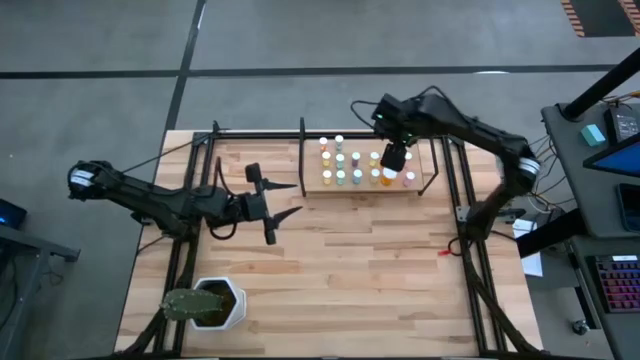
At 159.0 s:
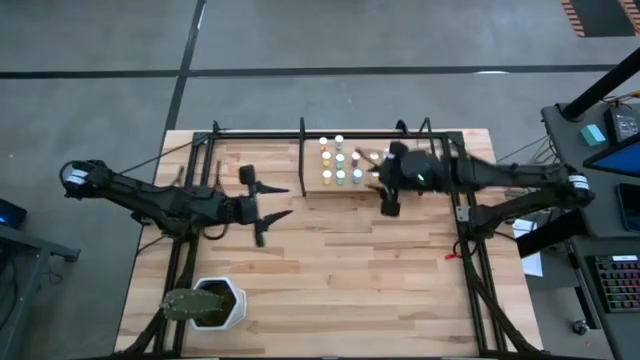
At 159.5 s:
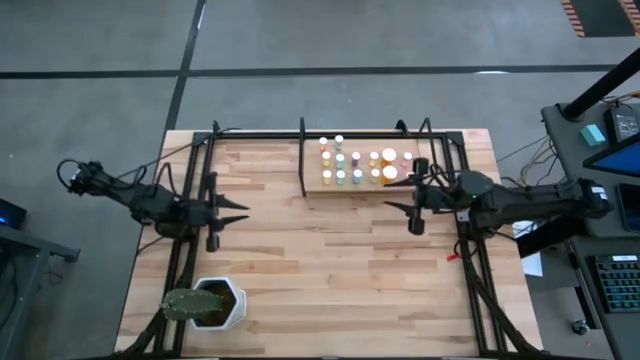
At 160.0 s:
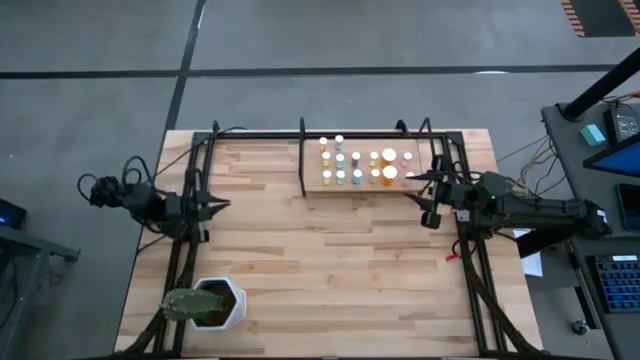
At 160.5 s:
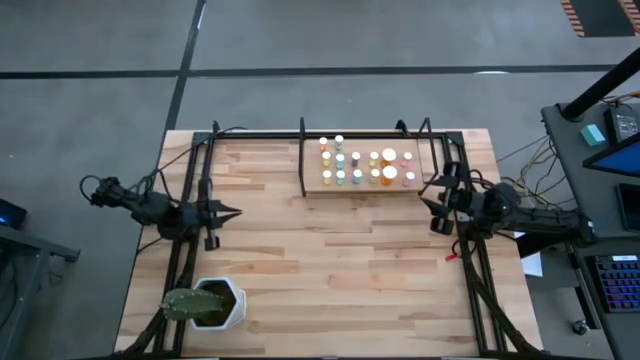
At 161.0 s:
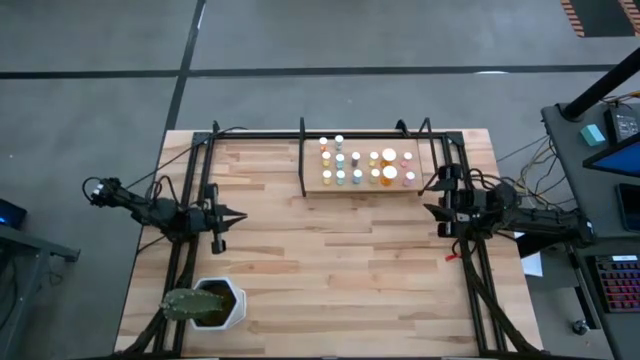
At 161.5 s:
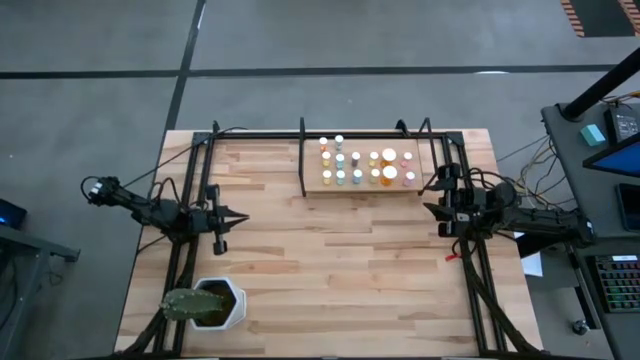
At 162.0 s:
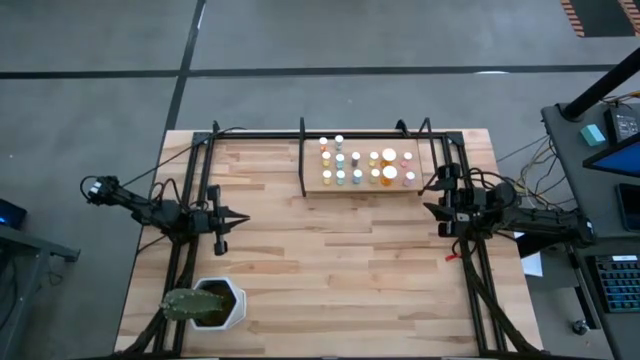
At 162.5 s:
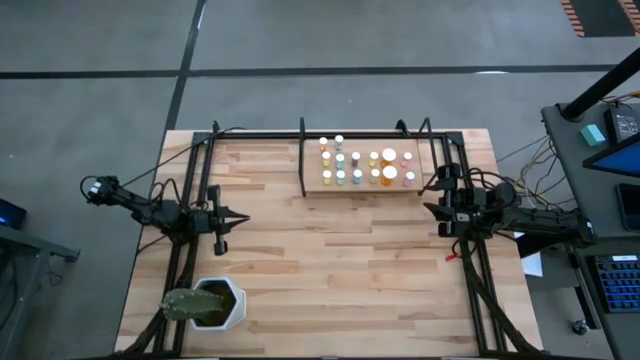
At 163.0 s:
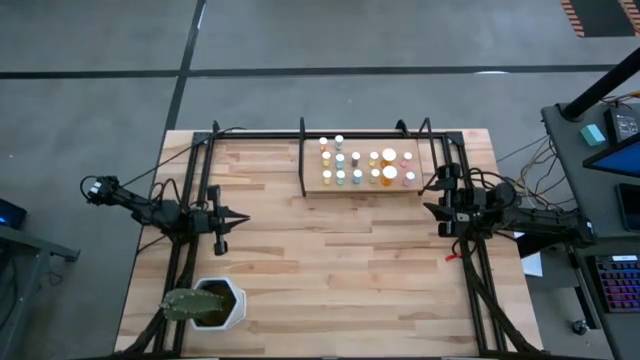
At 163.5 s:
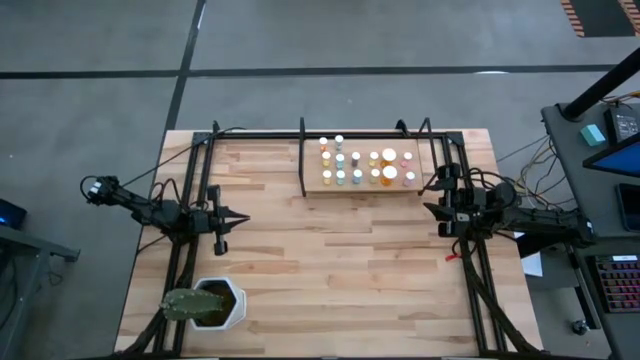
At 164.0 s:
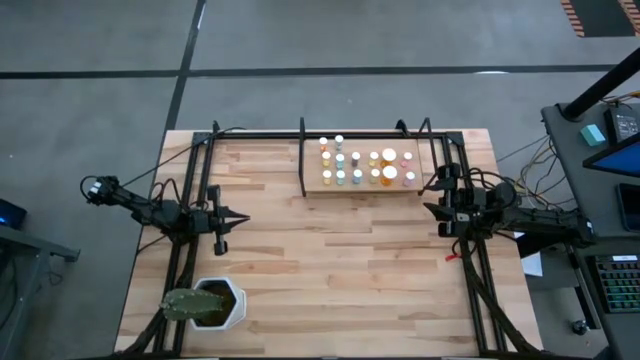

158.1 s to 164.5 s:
Task: Pick and place medicine bottles onto shelf by color
Return to Home Position

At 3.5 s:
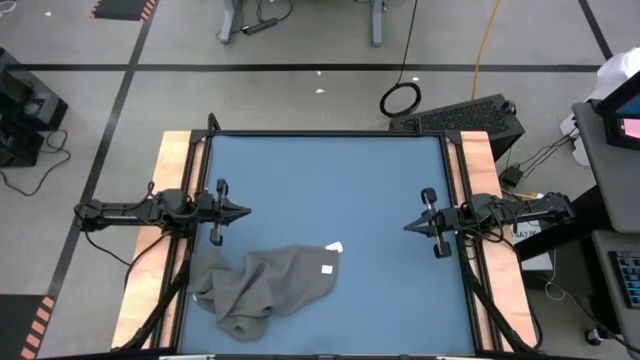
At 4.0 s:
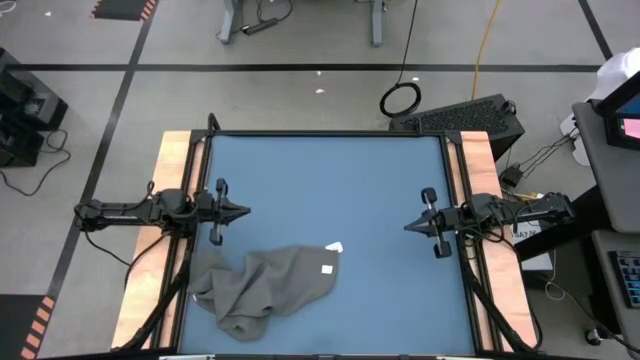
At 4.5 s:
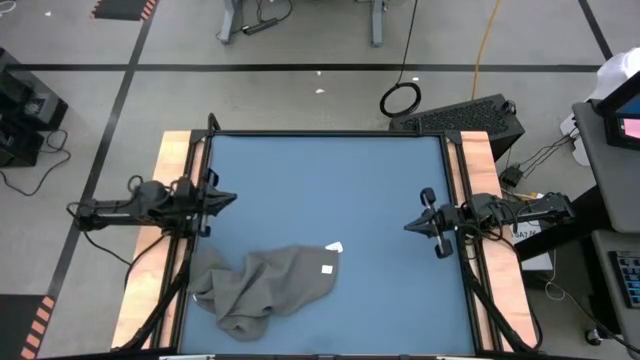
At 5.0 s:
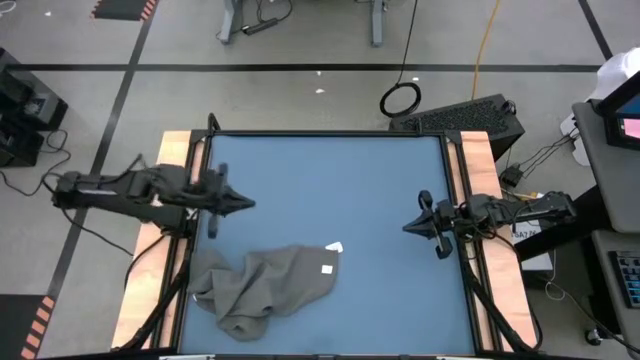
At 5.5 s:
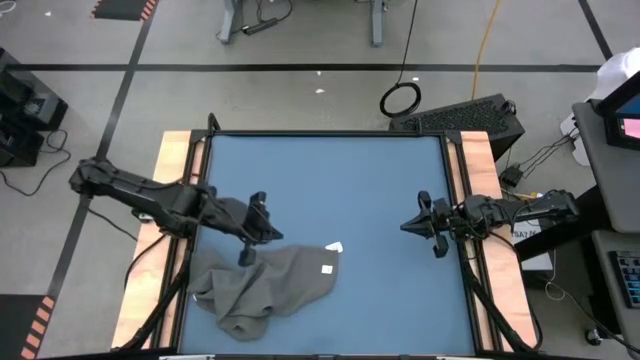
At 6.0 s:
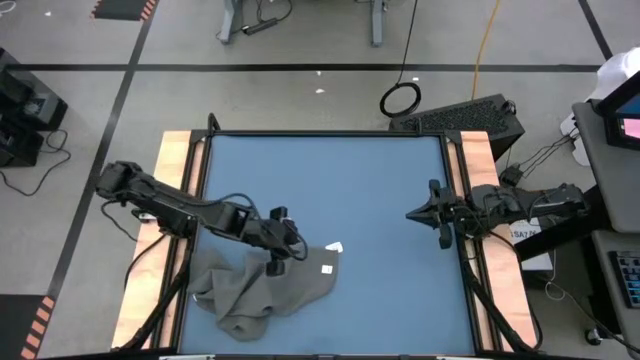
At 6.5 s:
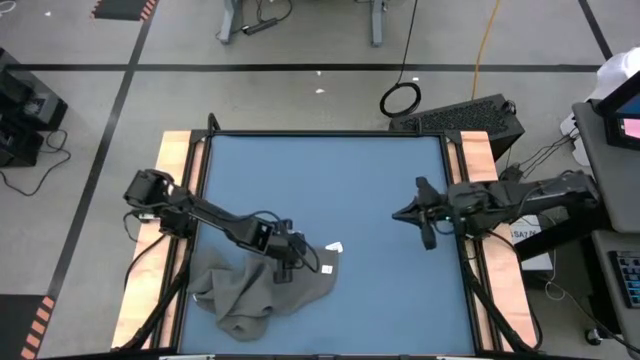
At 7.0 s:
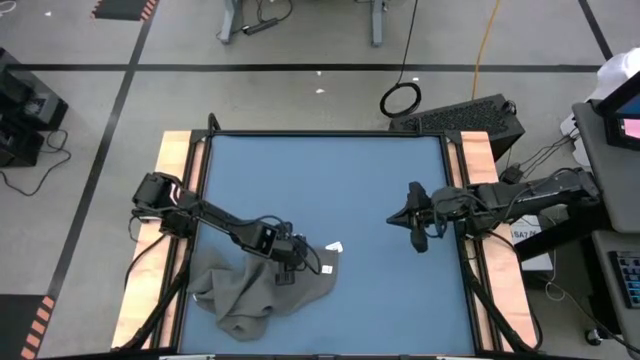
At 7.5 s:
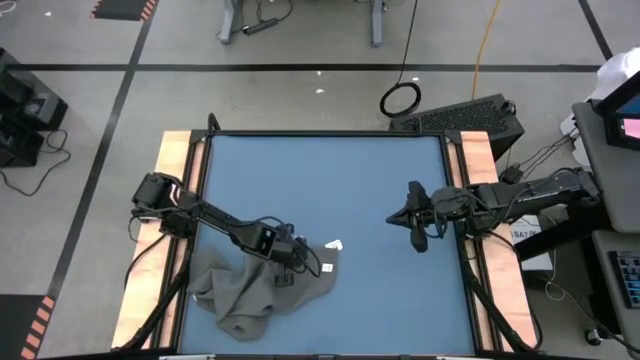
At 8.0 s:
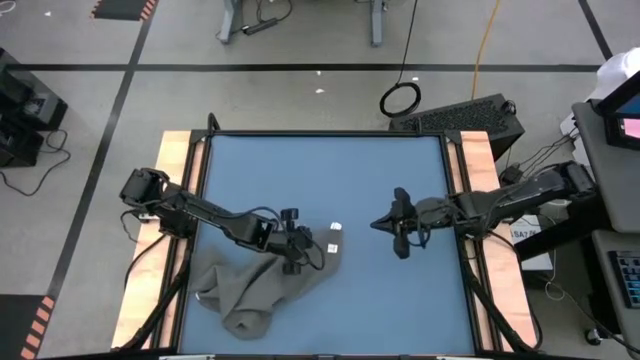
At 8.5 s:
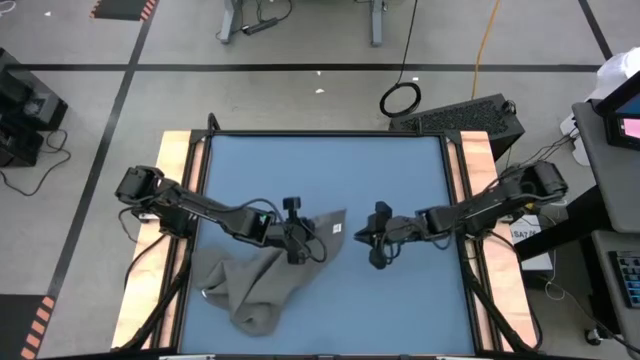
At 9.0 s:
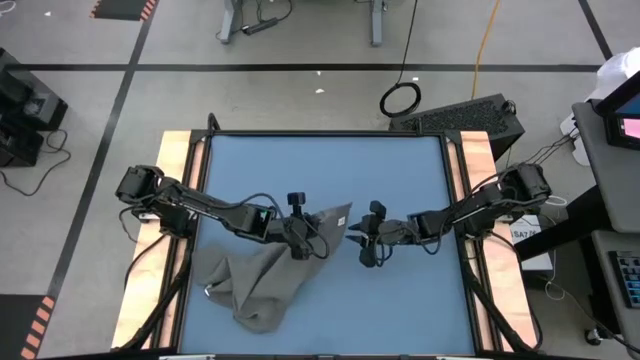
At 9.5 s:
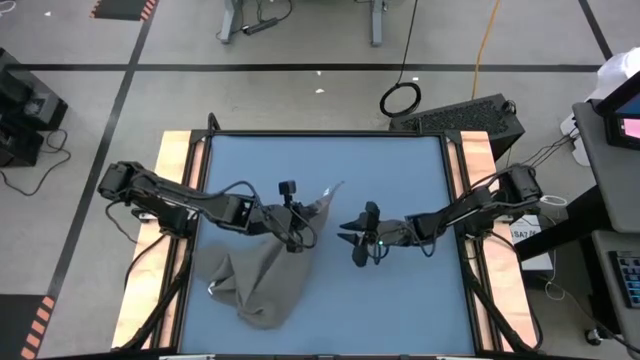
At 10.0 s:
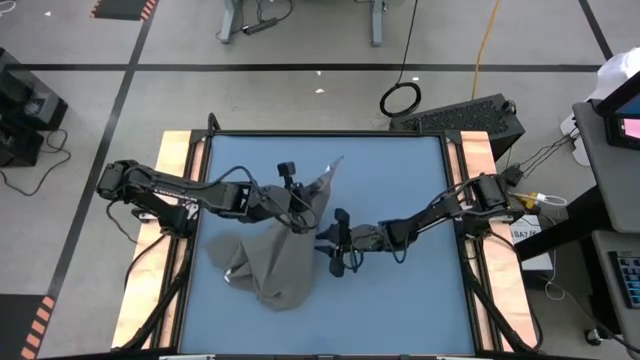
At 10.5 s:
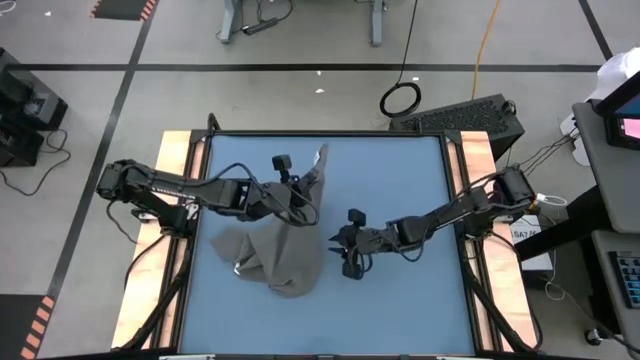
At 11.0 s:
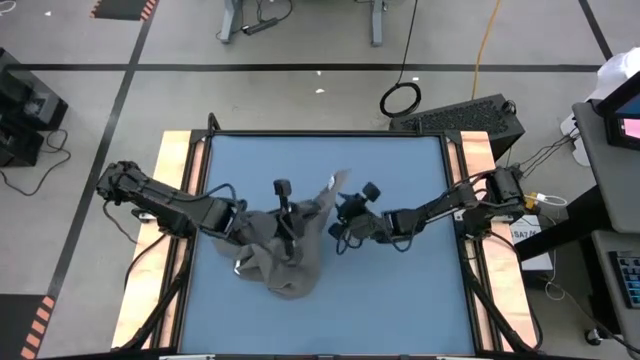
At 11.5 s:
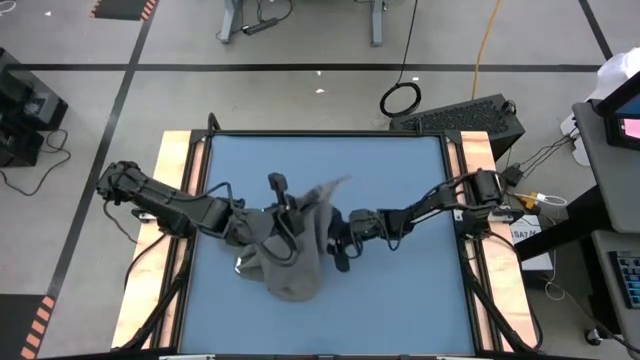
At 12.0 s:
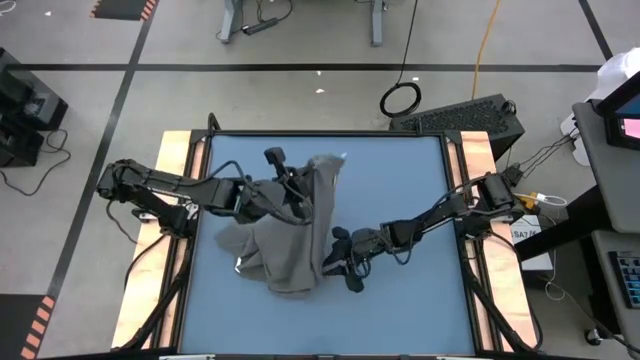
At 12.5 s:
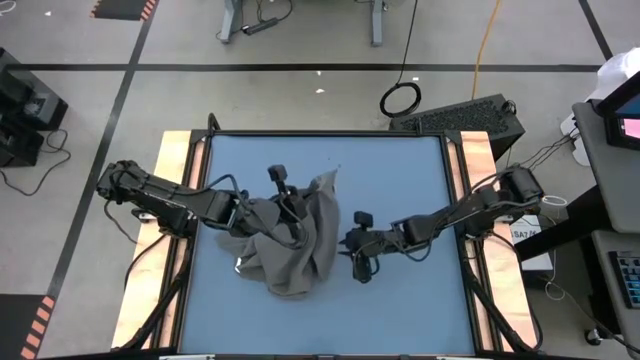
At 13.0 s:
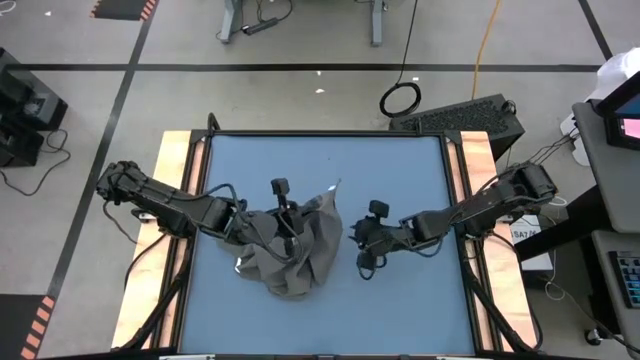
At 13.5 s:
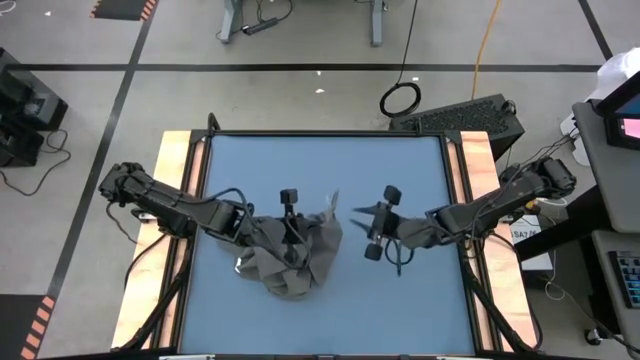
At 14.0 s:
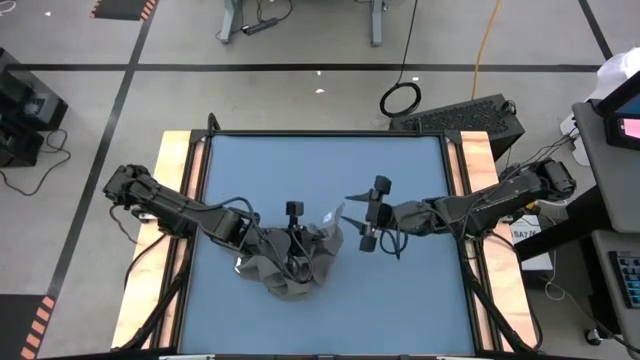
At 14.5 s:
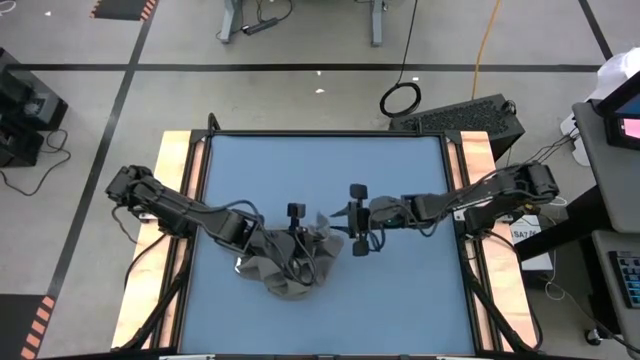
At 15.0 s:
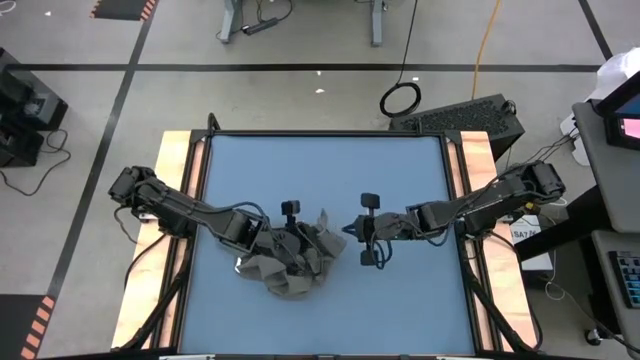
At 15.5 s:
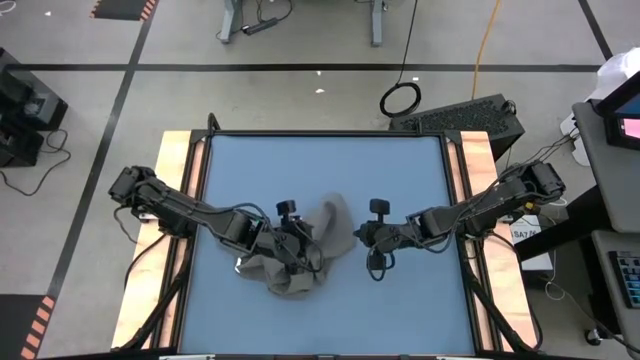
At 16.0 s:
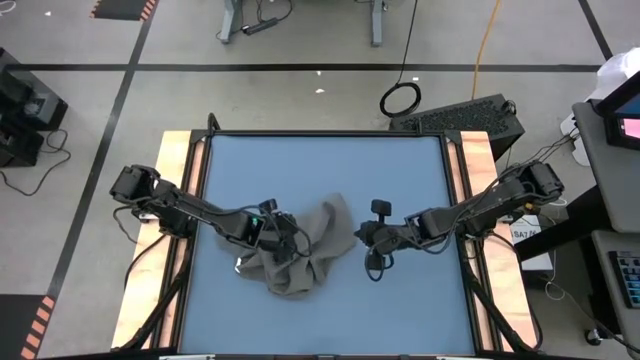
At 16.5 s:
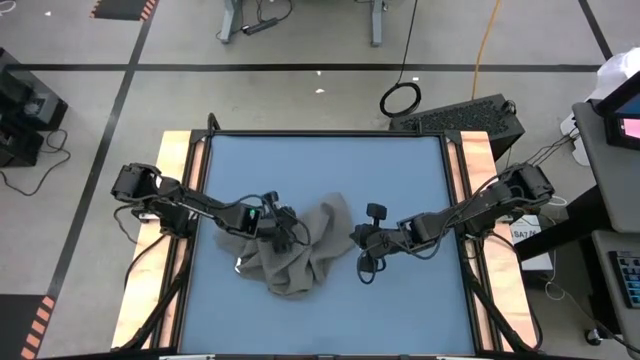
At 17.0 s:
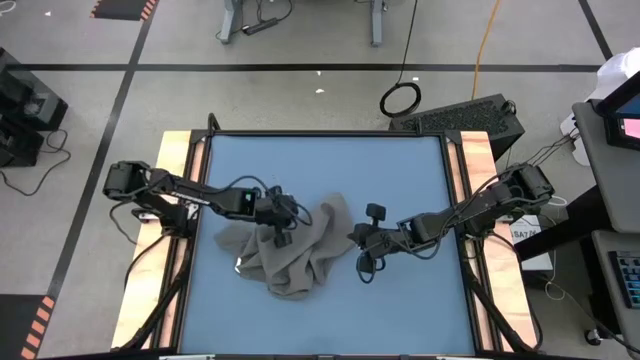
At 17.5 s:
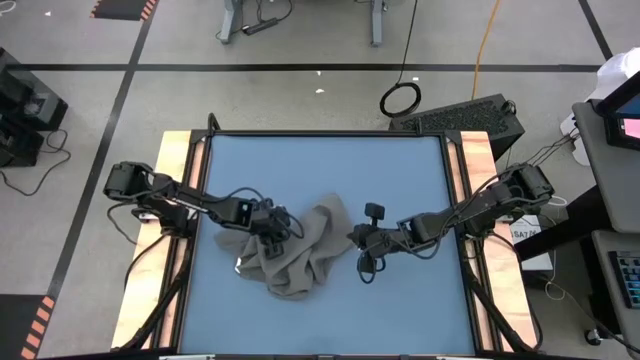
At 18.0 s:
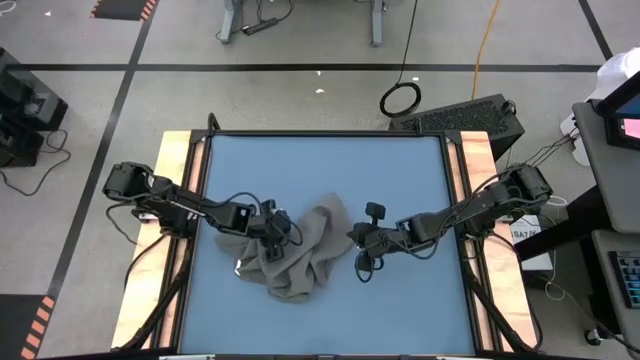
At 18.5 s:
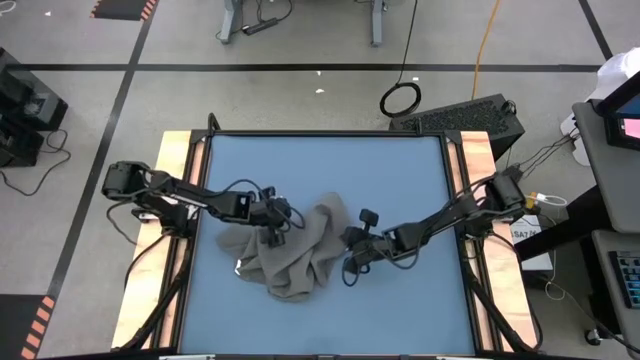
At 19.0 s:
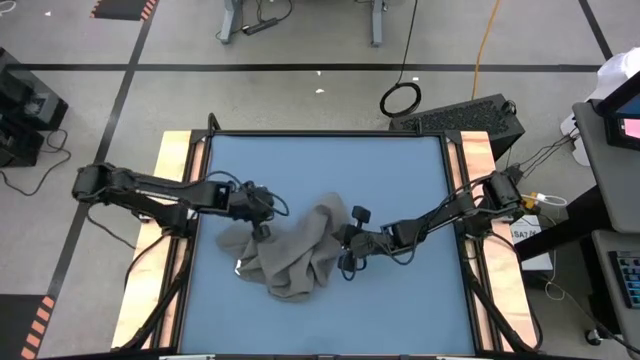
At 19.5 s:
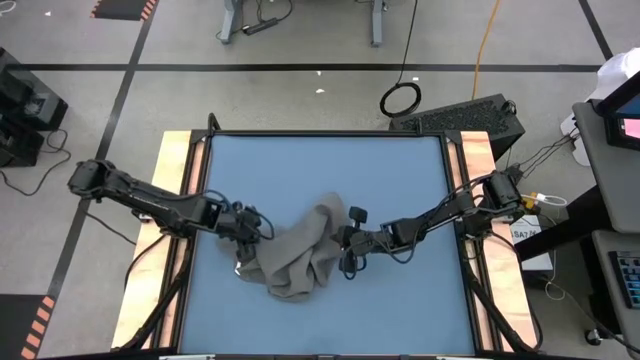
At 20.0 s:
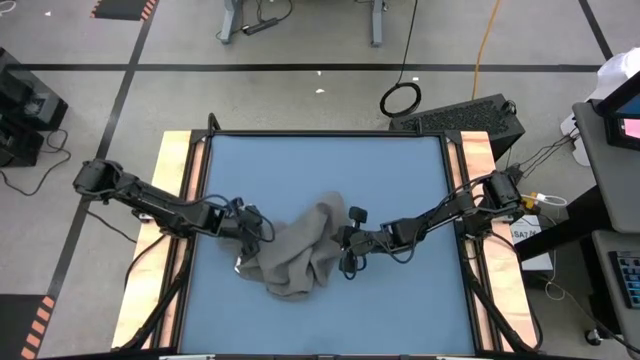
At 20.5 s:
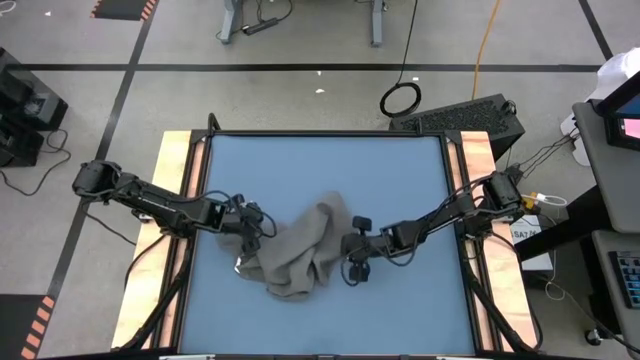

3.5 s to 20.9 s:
Task: Roll towel
Roll the gray towel
